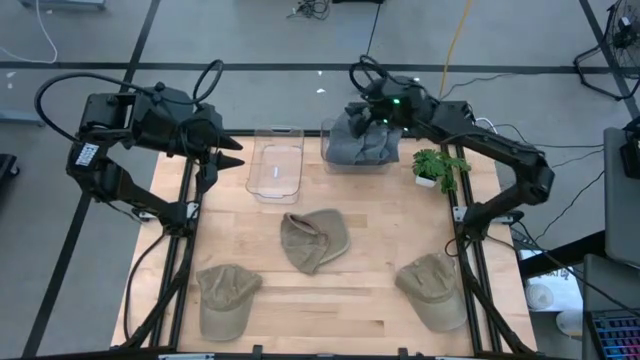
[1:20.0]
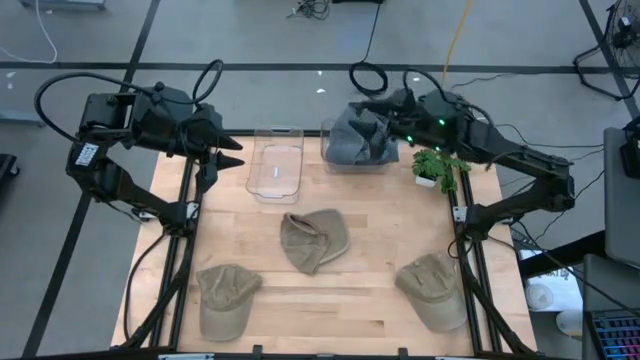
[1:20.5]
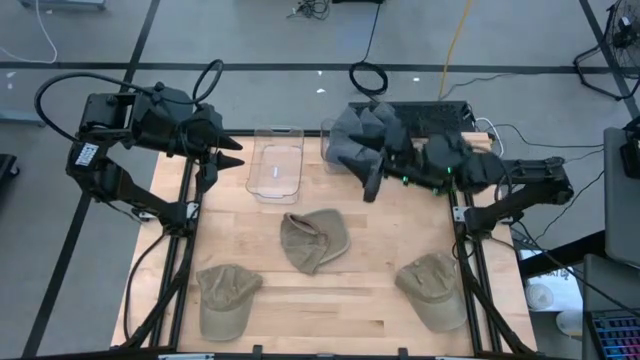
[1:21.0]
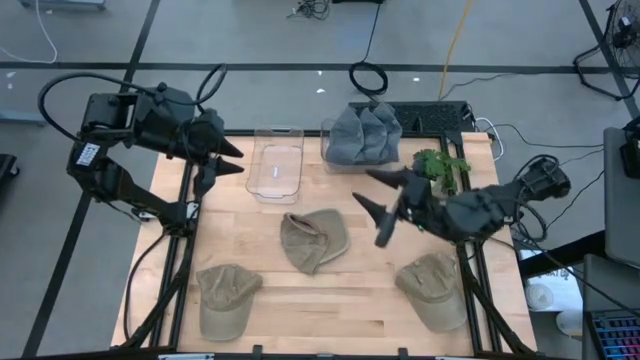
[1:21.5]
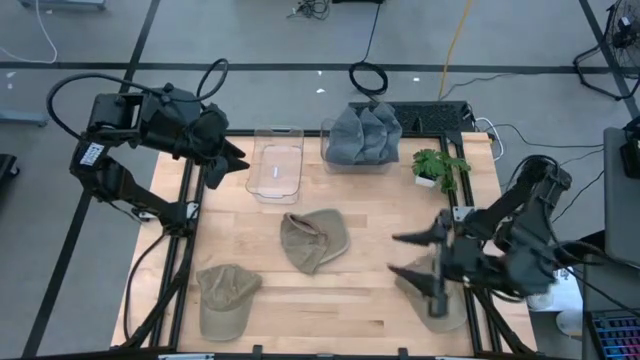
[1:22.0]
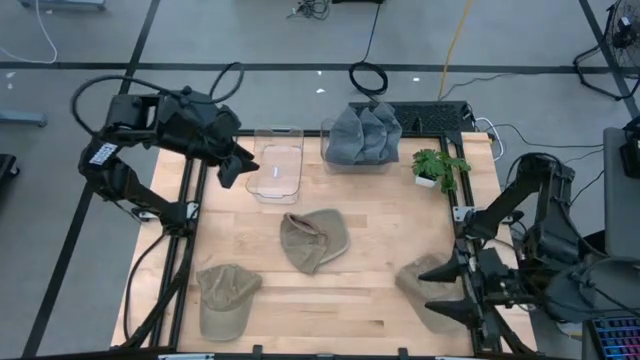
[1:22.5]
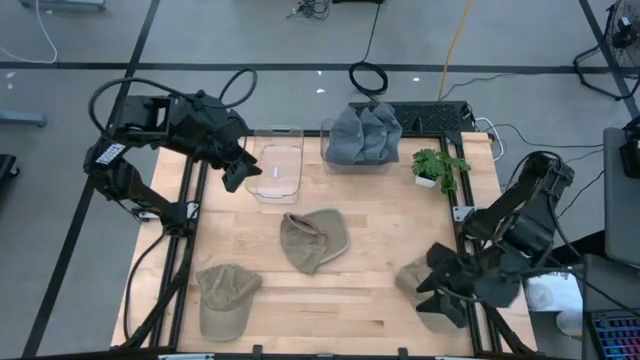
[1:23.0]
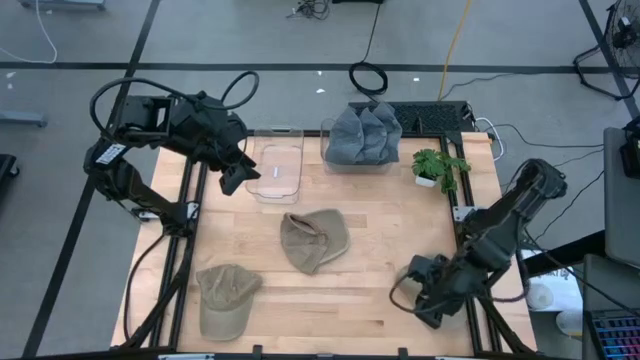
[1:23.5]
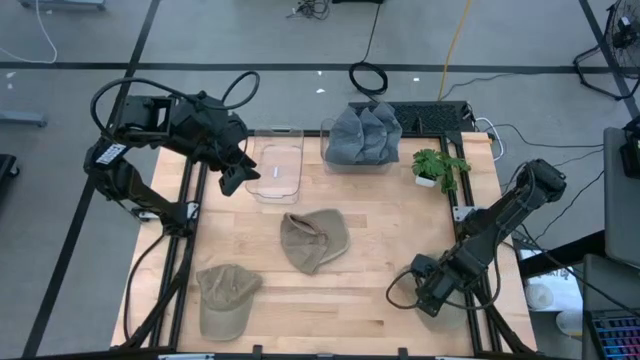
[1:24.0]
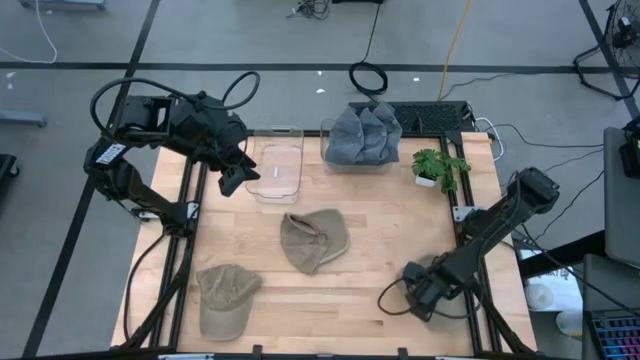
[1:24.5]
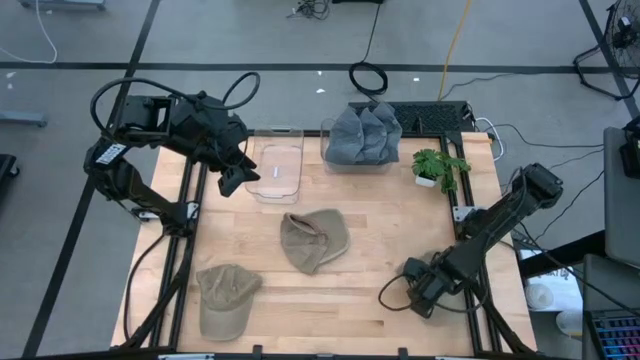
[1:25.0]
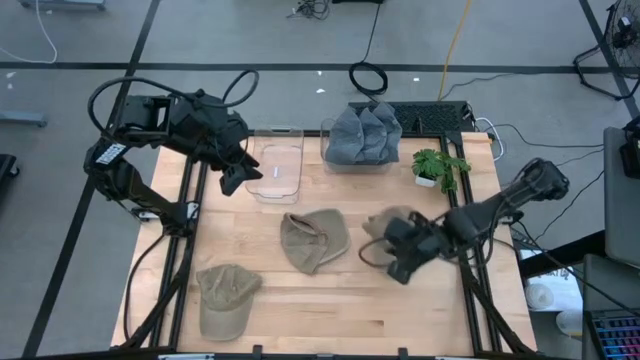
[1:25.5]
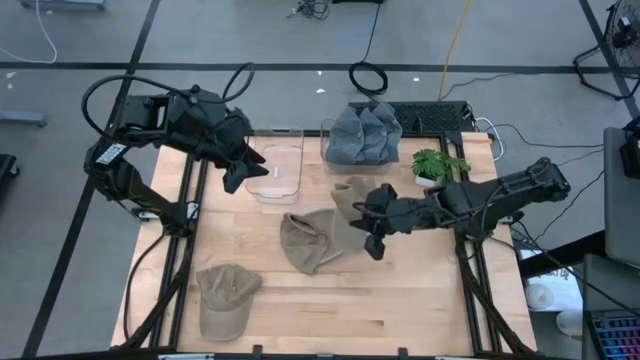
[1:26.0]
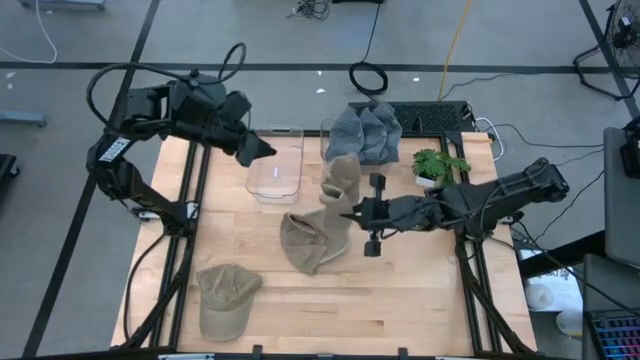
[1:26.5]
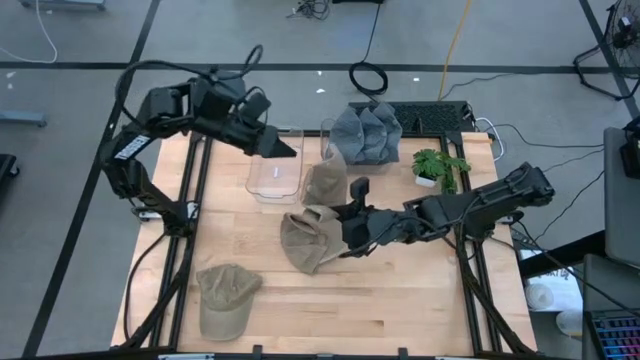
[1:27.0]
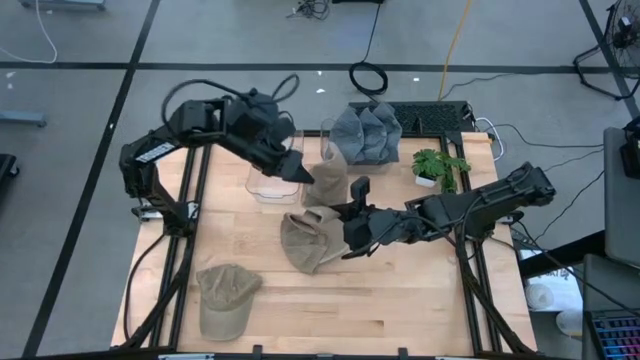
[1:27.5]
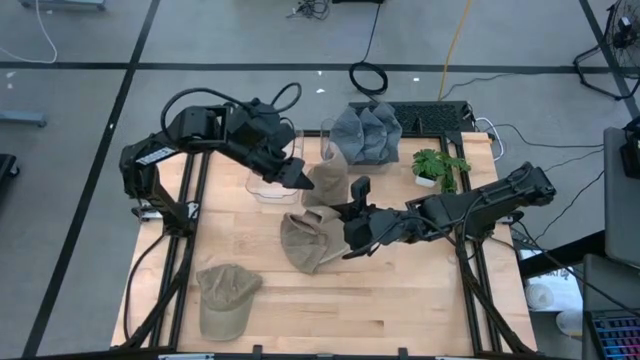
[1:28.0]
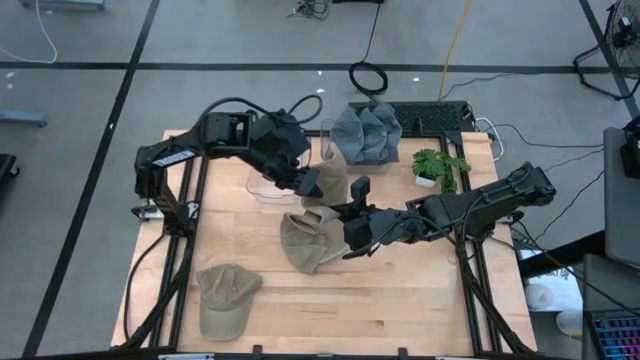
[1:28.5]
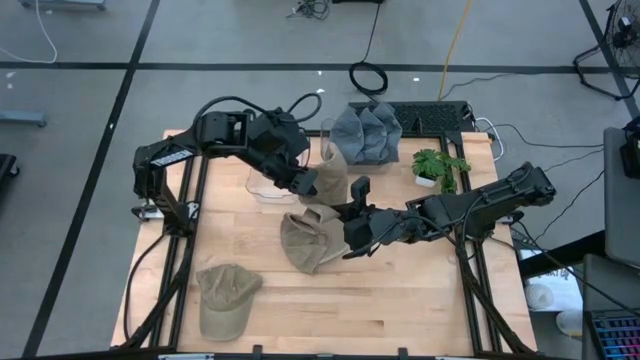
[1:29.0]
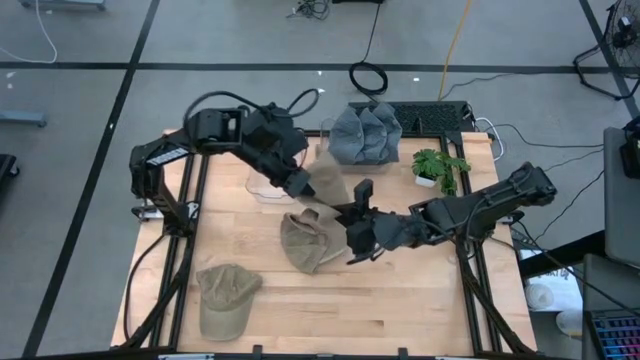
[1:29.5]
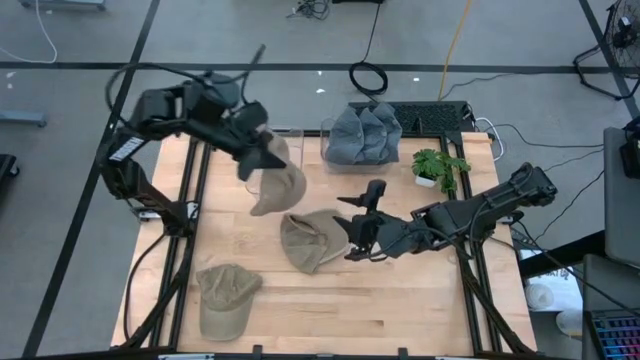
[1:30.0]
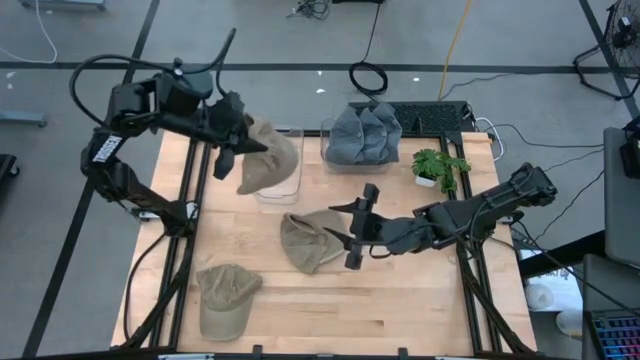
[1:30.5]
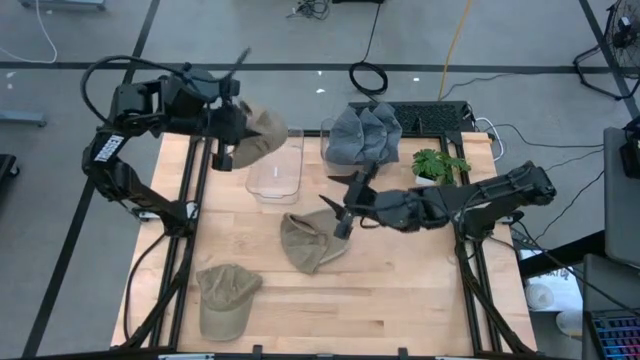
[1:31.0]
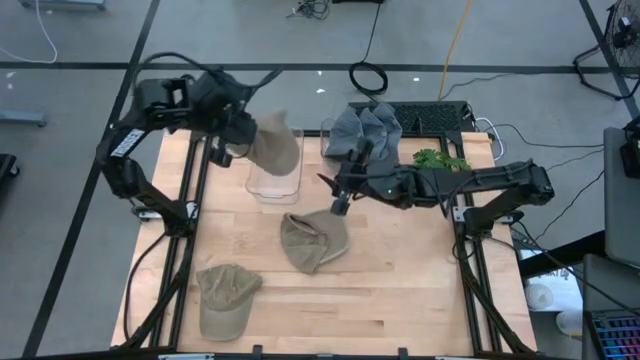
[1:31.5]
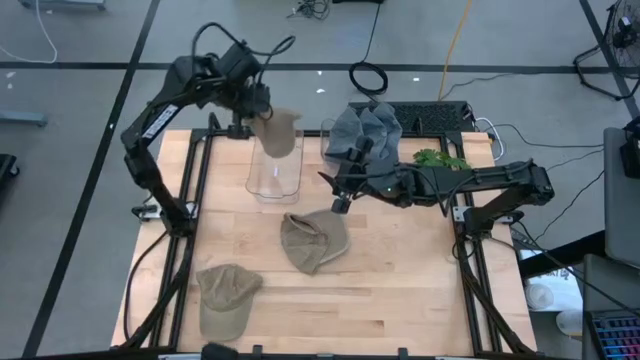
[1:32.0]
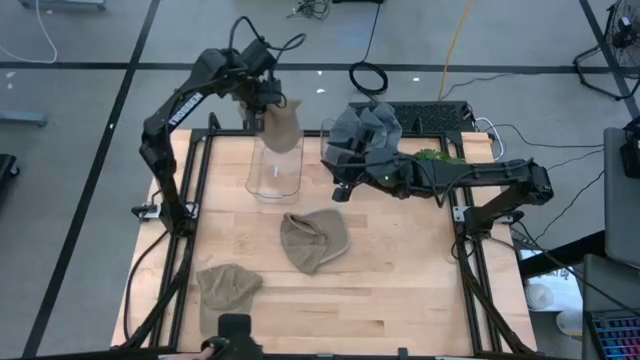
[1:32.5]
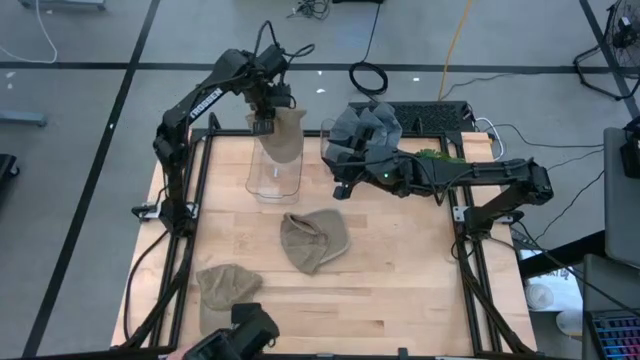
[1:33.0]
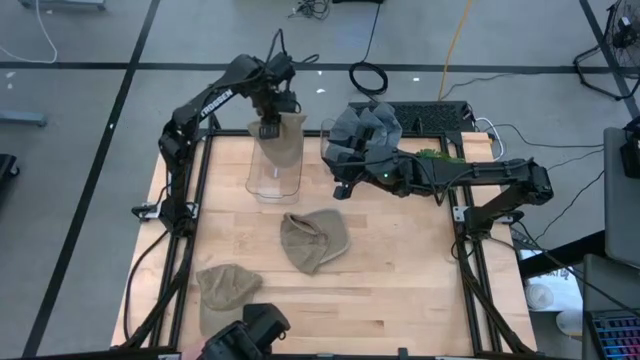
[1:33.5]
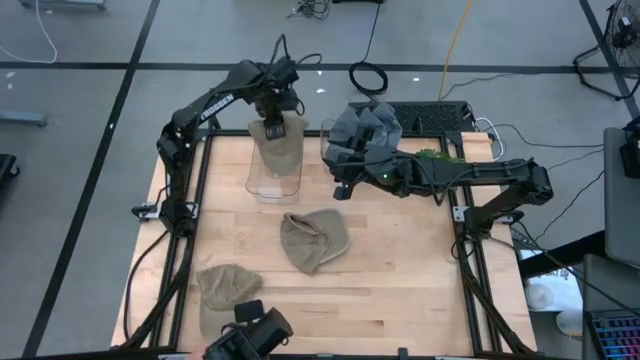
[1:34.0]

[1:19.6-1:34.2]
Task: Pick & Place hat
Put the bottom right brown cap into the left transparent bin

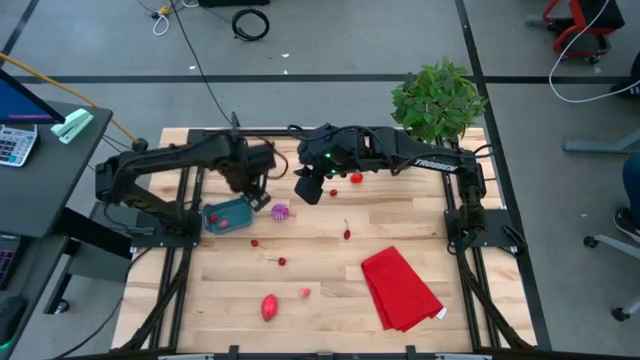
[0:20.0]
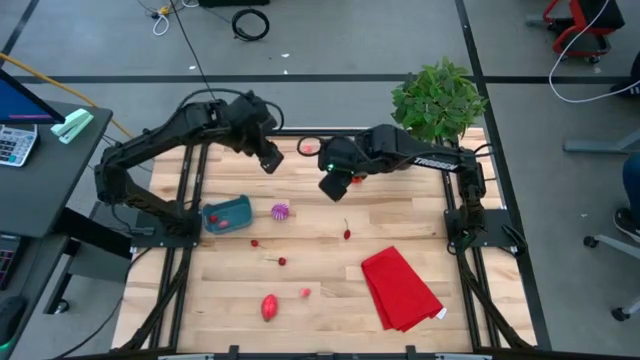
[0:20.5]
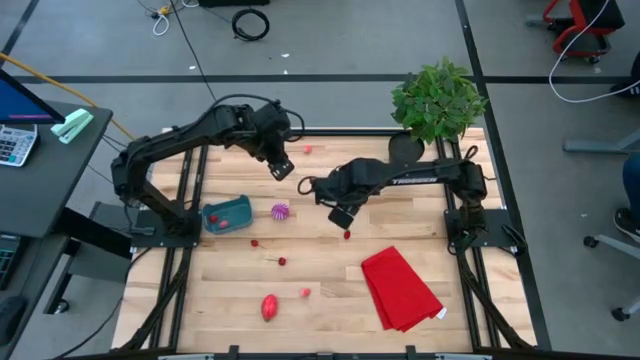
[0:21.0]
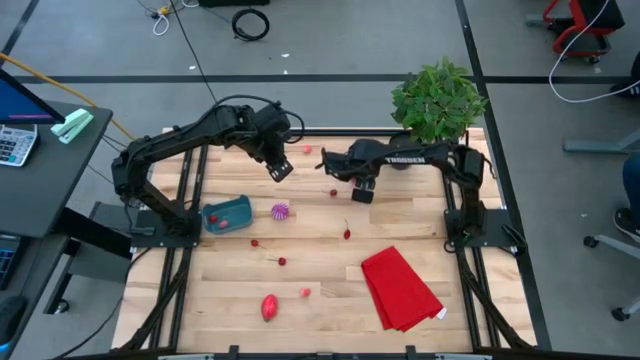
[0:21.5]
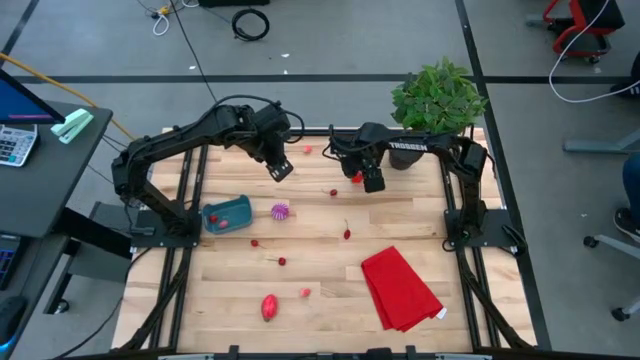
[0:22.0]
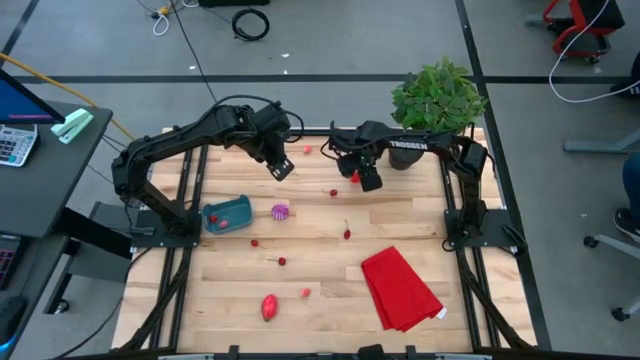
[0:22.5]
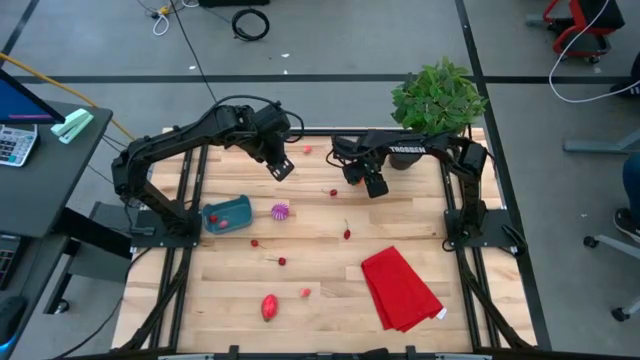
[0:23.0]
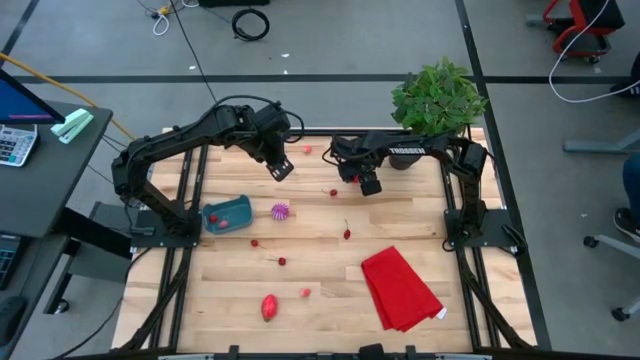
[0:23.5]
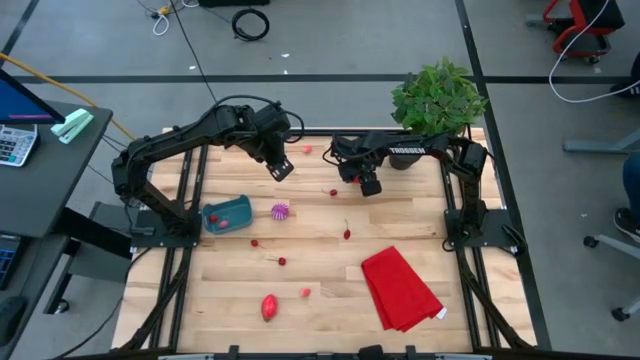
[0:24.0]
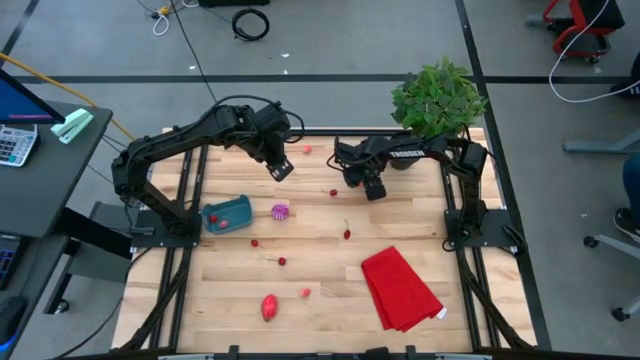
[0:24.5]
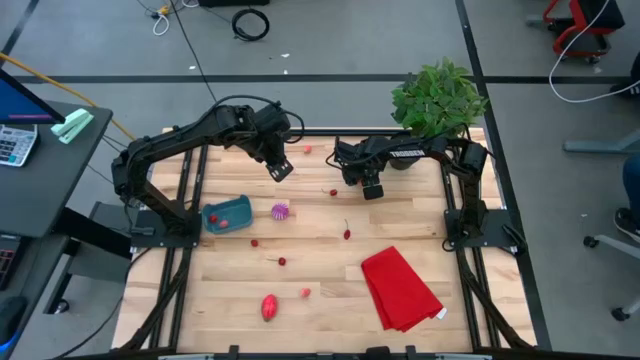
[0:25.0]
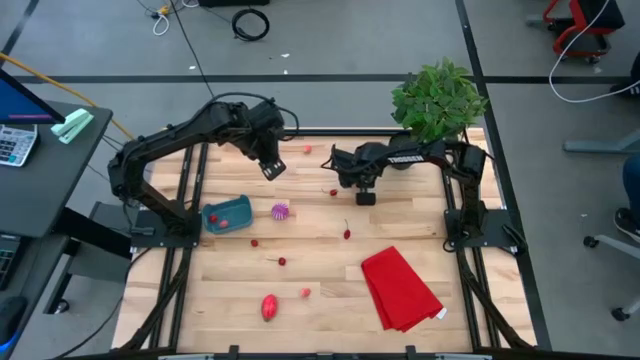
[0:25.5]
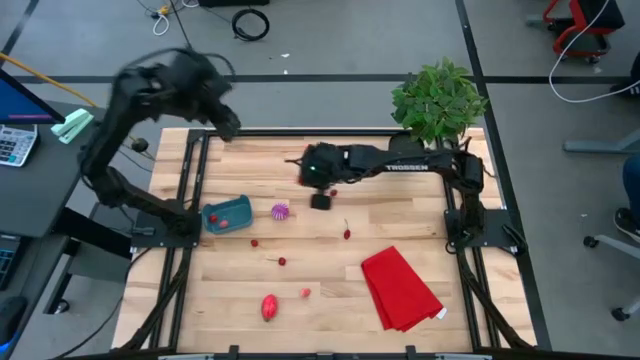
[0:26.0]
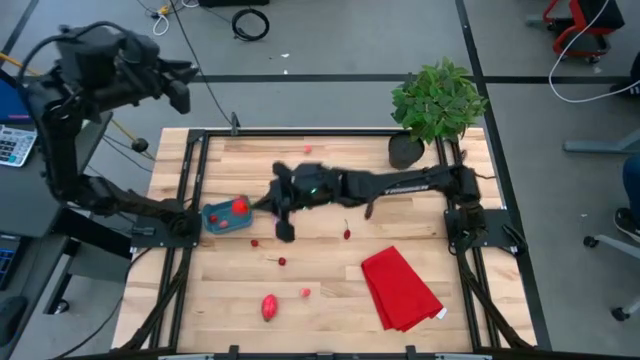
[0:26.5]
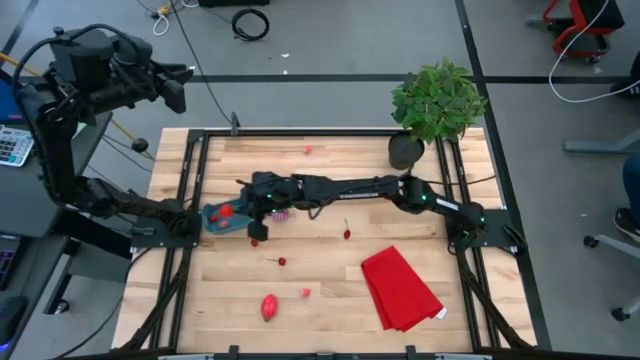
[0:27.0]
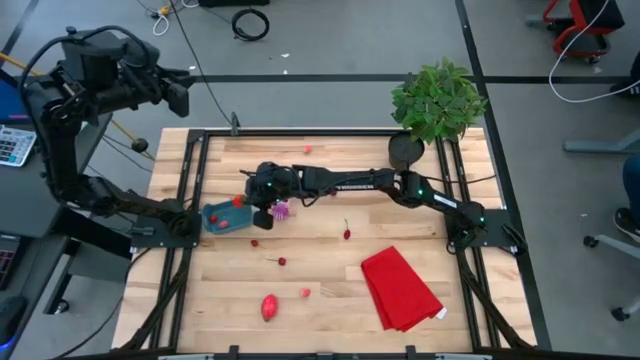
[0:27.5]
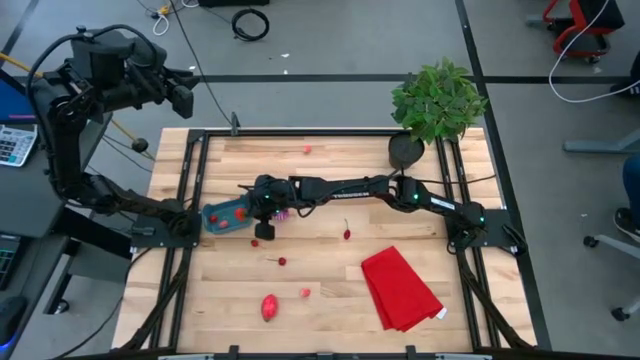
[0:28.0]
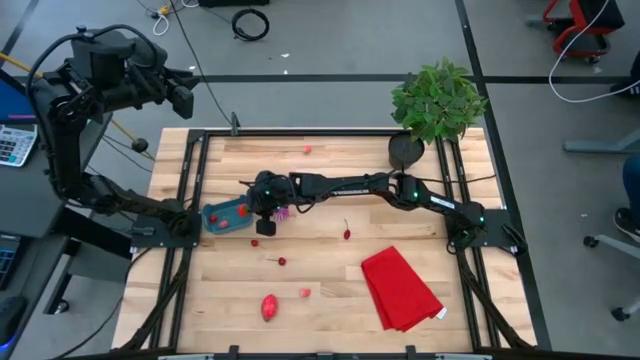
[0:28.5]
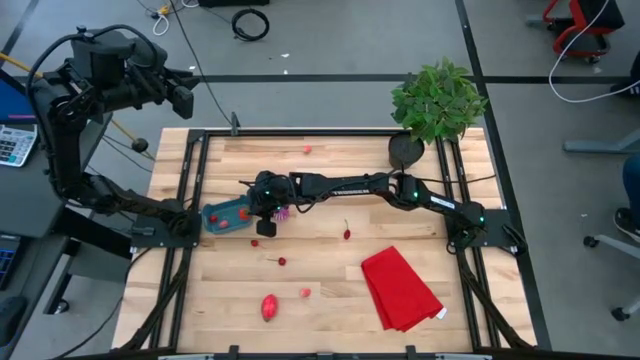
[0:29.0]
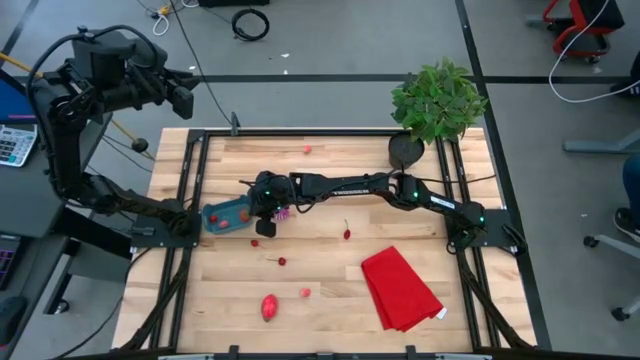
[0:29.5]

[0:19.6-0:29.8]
Task: Pick and placing Produce into tupperware
Put the red strawberry into the blue bin
